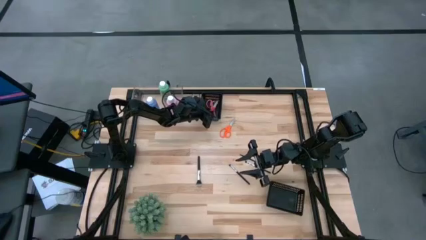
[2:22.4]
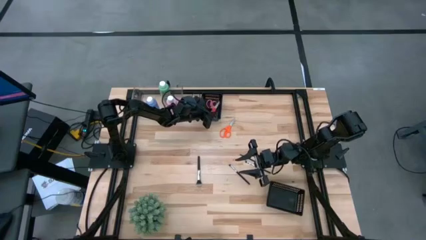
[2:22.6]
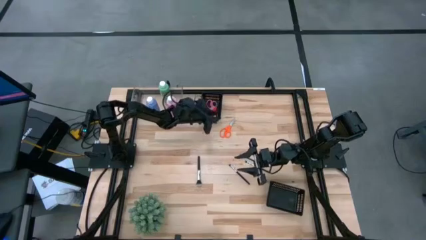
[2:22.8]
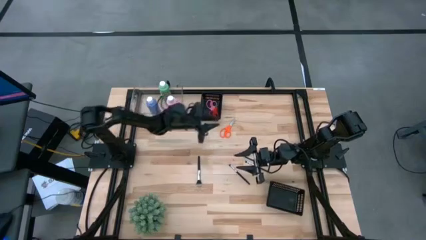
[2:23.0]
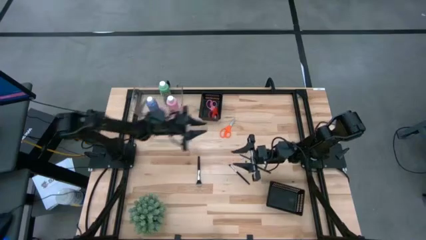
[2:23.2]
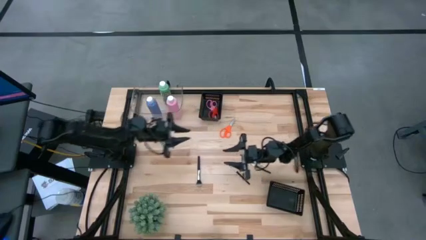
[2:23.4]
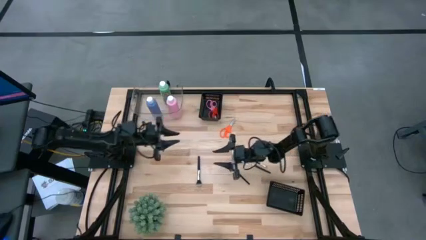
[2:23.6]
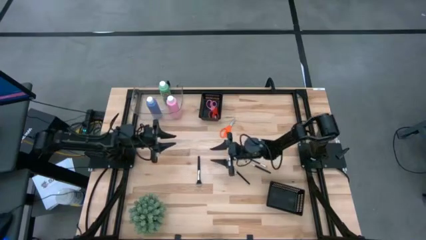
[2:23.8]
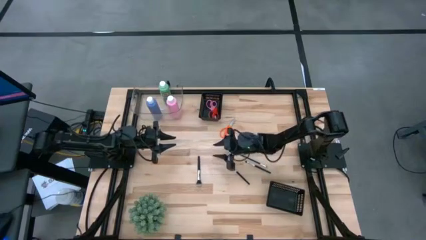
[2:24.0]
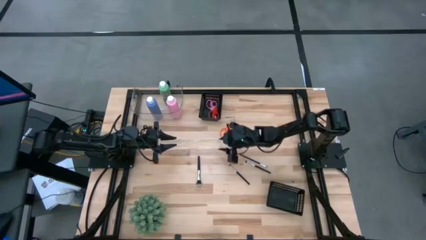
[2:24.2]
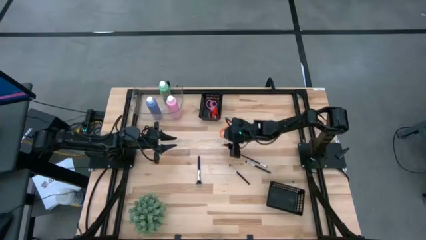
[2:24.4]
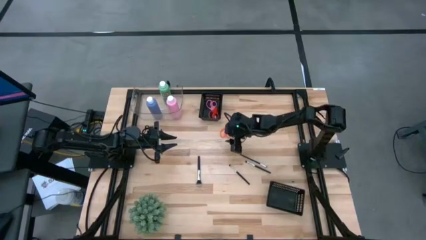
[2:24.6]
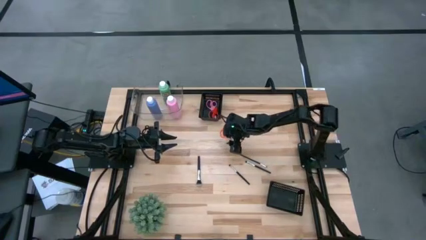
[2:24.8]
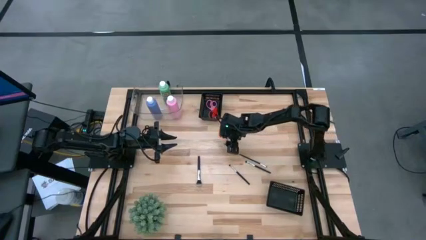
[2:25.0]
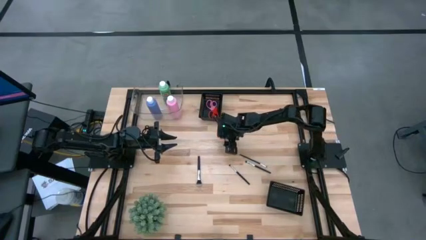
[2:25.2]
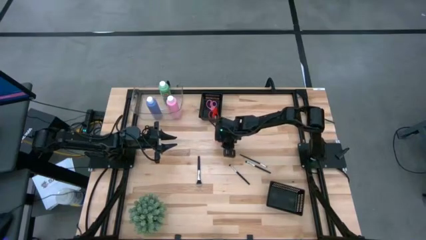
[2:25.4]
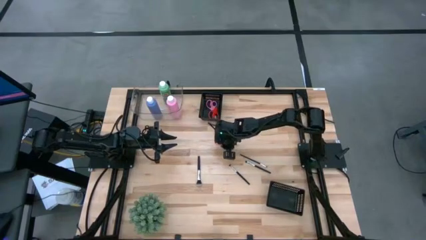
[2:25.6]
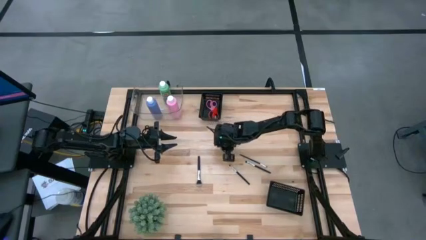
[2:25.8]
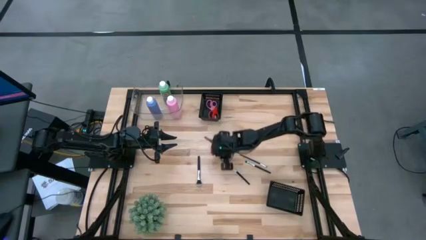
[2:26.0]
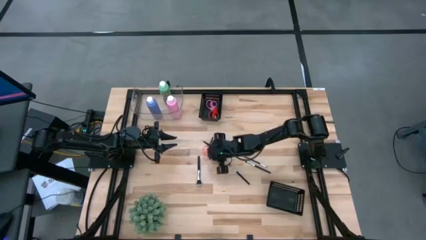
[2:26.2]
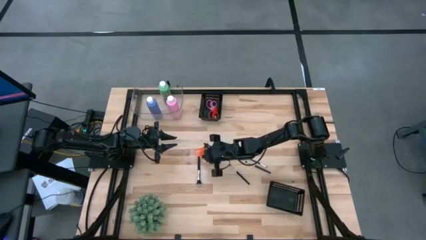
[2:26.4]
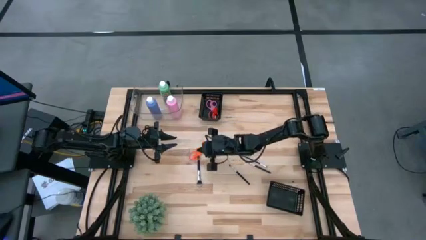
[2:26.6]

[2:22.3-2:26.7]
Task: Pick & Place Paint Supplies
Put the orange scissors into the top black bin

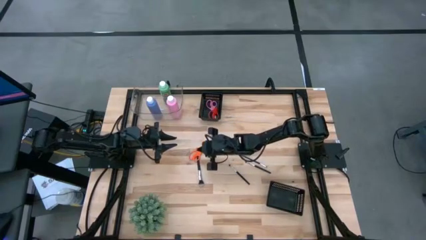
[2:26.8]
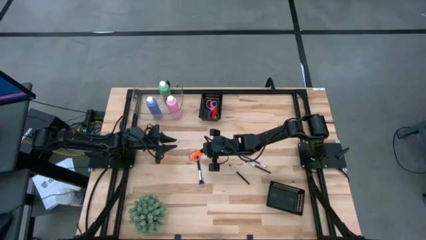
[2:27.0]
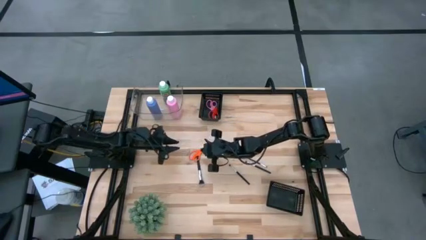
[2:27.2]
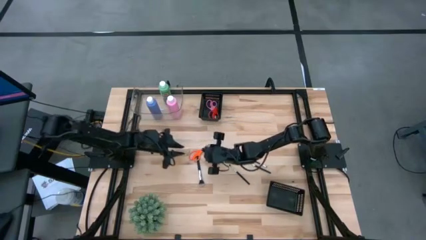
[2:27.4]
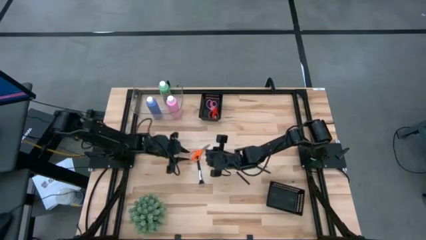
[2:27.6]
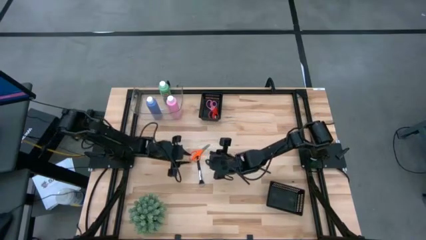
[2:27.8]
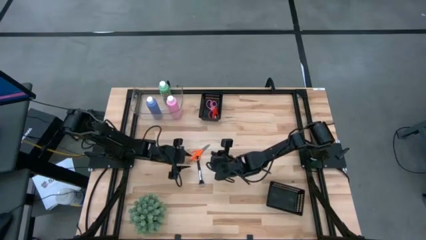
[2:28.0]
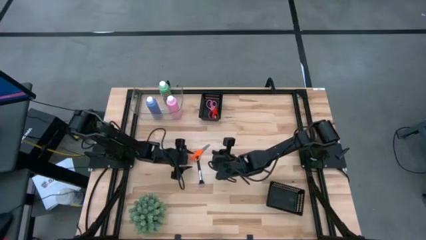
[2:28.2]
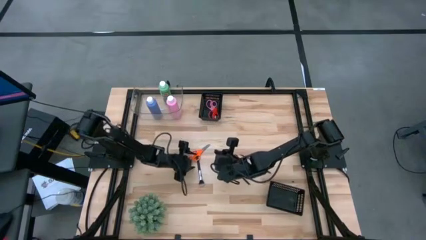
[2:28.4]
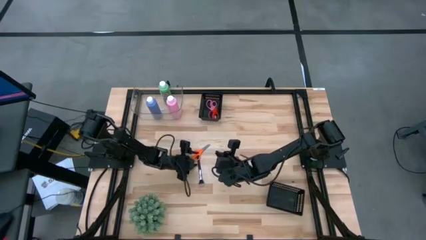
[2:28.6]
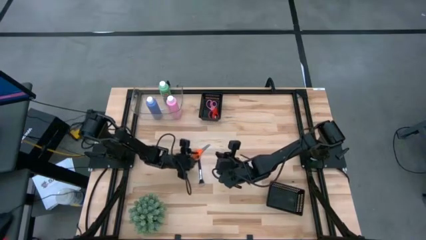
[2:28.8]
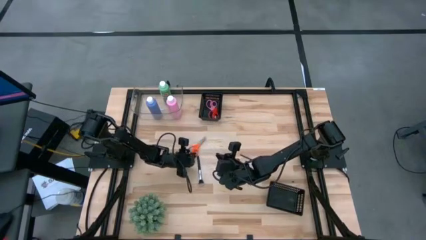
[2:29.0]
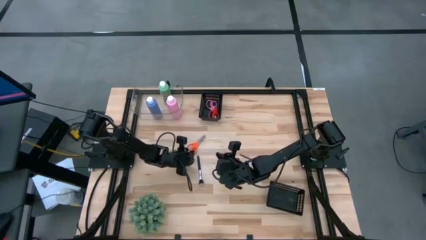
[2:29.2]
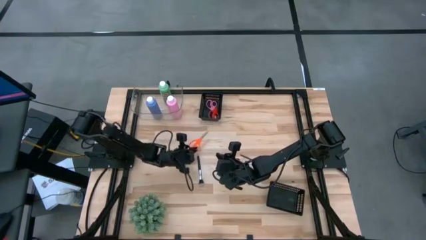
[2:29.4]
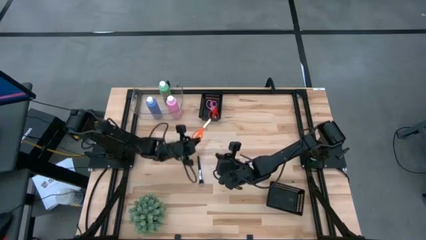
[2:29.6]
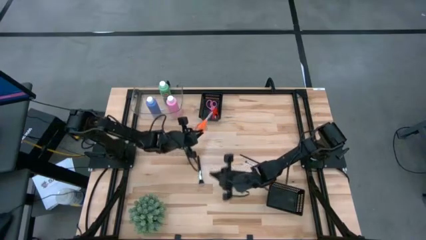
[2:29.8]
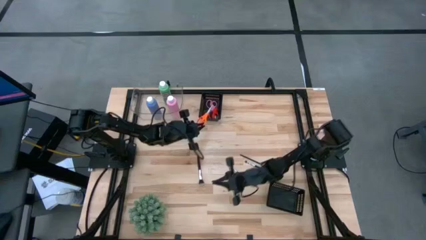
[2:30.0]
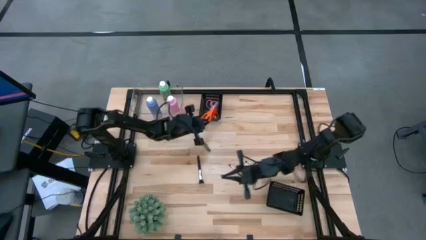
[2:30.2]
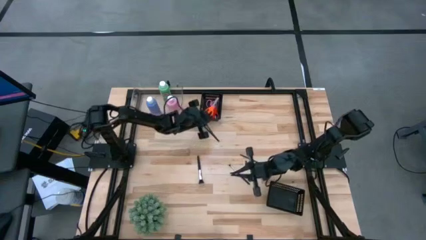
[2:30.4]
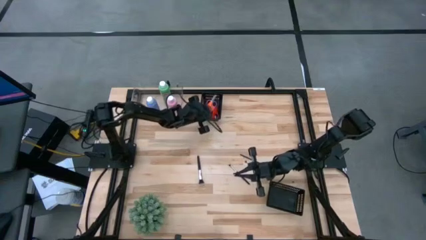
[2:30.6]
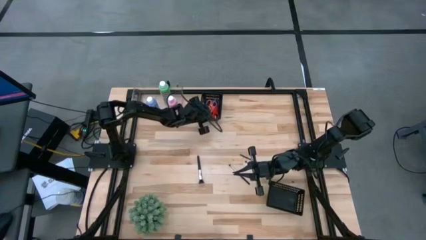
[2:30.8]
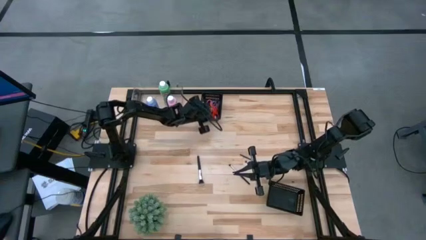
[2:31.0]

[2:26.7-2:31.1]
Put the orange scissors into the top black bin

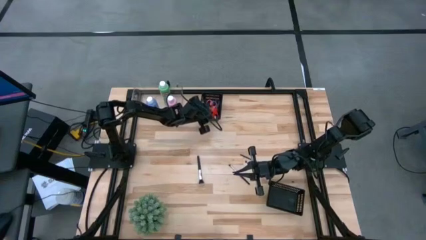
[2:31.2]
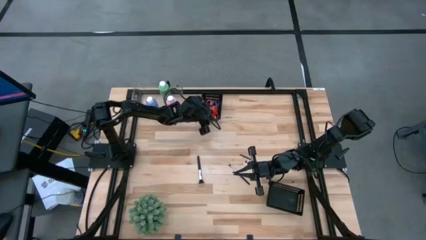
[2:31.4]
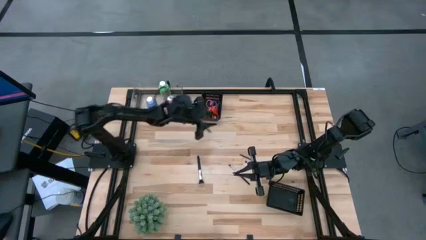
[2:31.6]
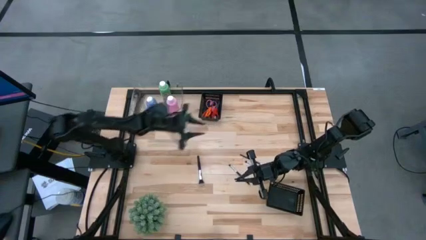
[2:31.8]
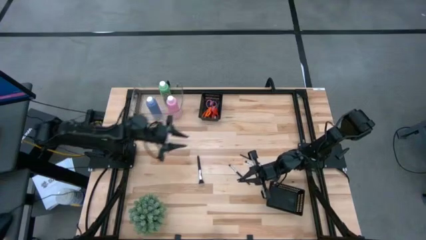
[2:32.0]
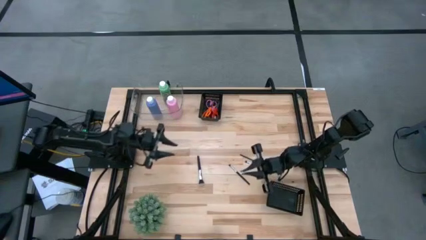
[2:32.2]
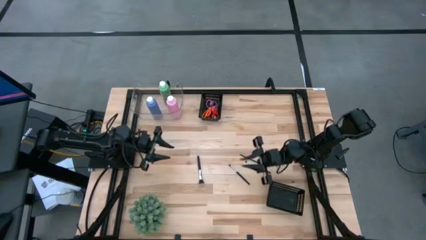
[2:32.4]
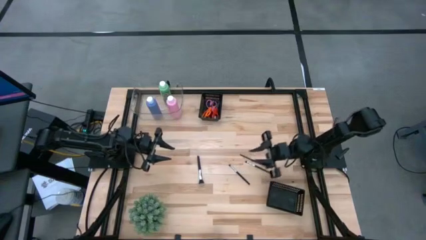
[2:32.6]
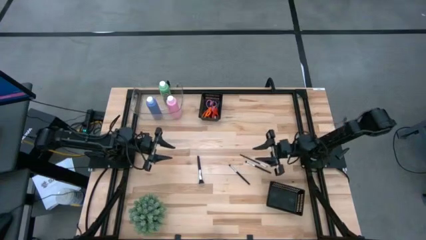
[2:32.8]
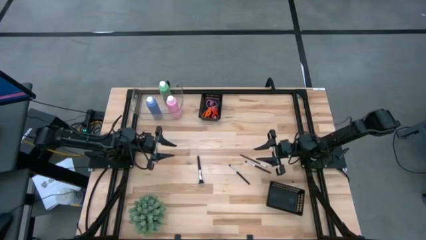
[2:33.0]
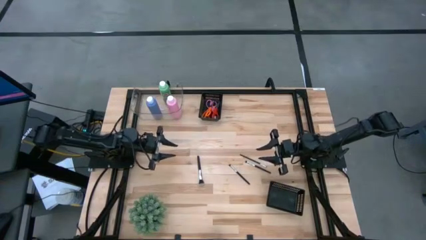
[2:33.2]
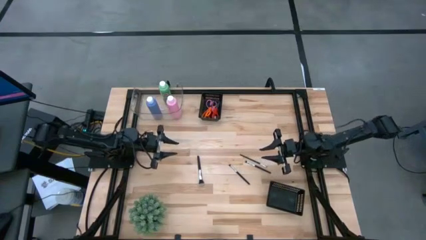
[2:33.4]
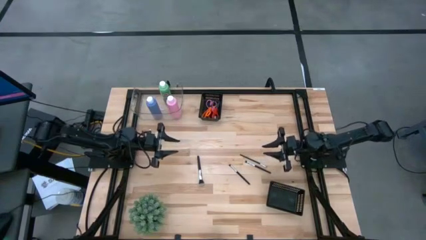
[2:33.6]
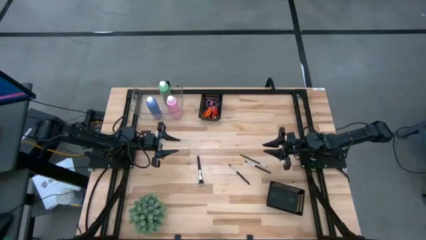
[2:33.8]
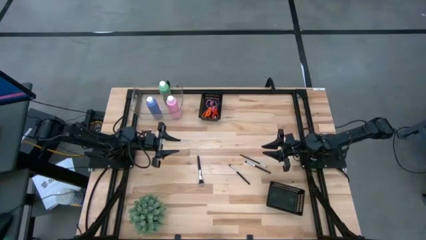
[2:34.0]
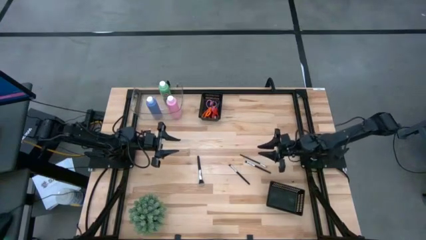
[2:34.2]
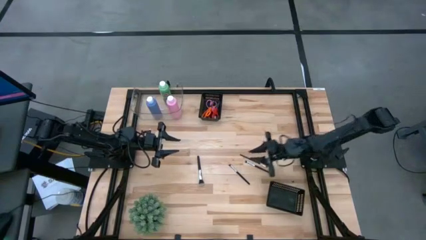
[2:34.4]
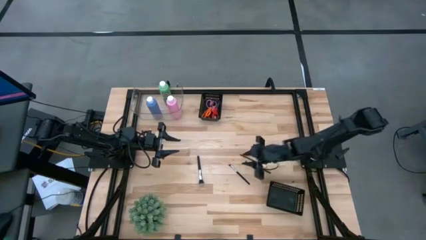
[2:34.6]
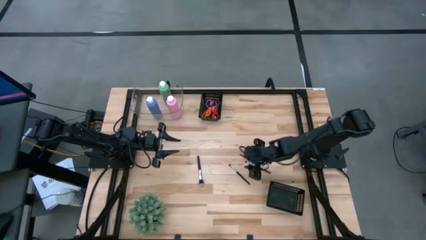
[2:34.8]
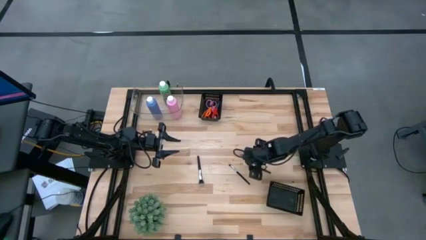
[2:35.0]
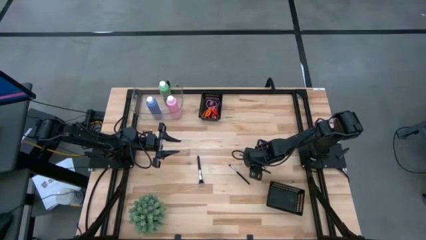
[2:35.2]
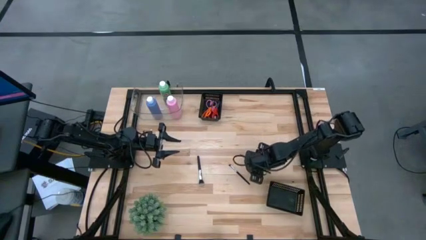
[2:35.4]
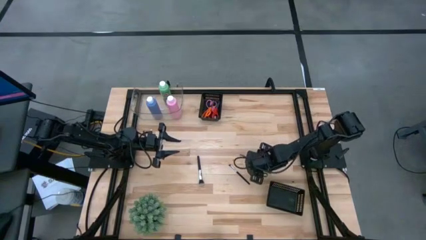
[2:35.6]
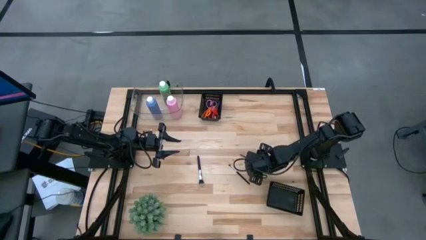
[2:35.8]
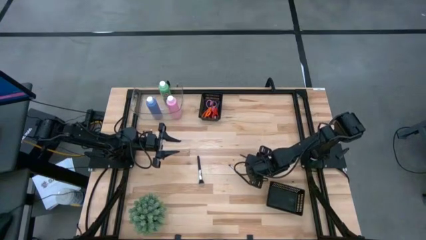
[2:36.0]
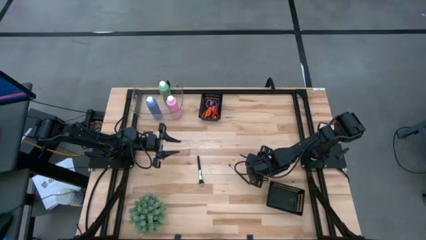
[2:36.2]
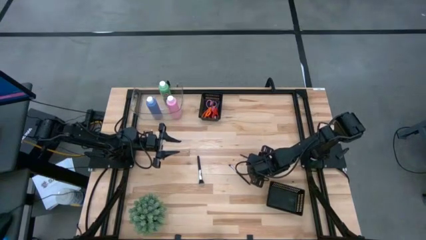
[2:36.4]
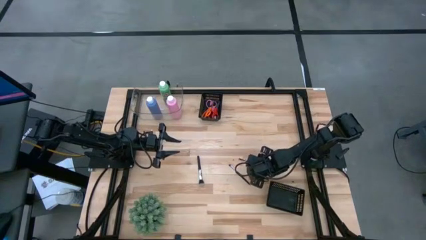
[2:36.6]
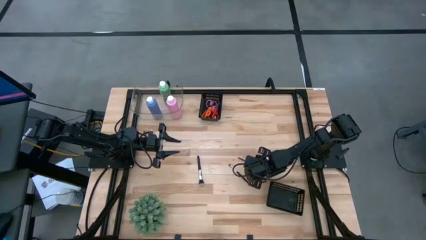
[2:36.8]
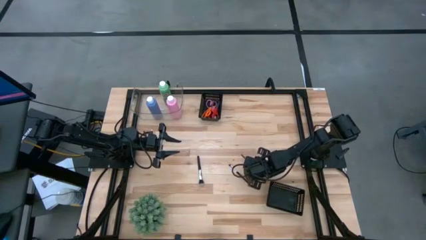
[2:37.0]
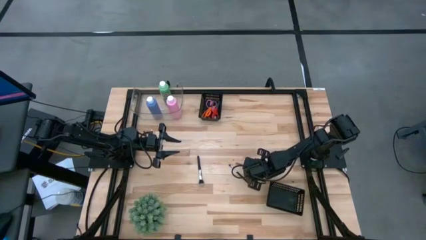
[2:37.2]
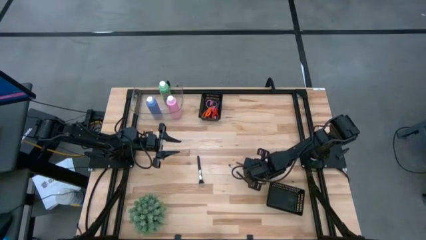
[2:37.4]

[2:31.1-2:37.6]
Put the black paint brush into the bottom black bin

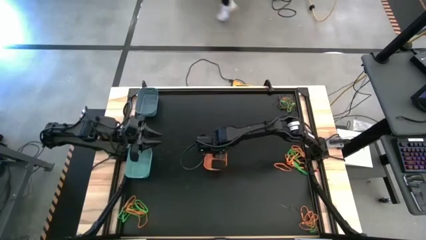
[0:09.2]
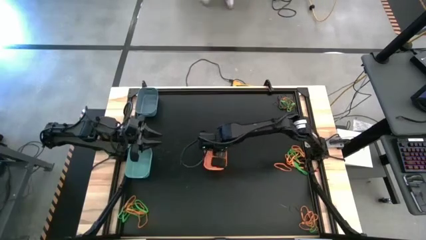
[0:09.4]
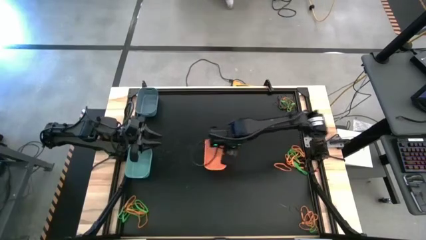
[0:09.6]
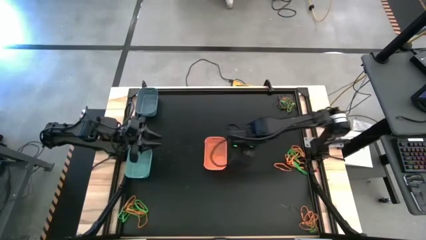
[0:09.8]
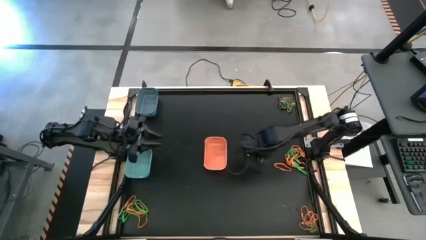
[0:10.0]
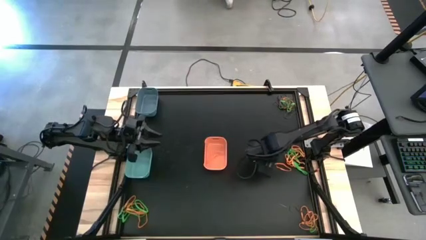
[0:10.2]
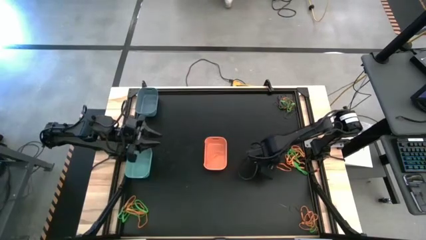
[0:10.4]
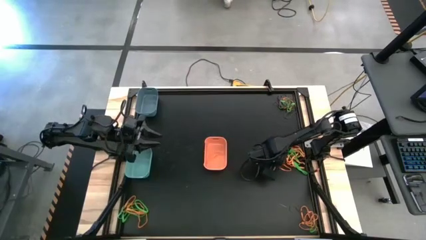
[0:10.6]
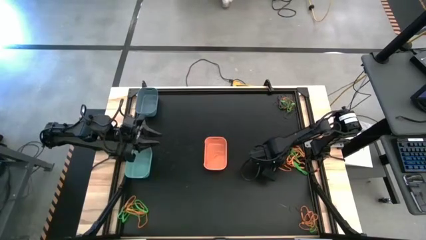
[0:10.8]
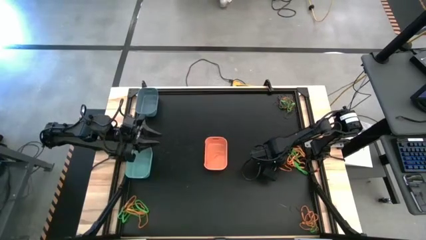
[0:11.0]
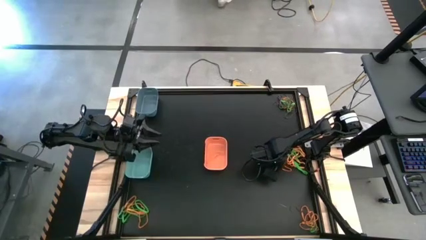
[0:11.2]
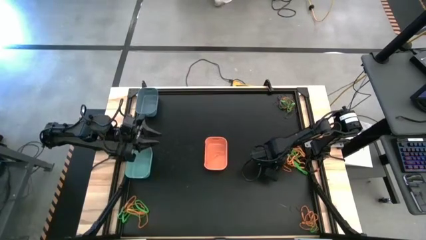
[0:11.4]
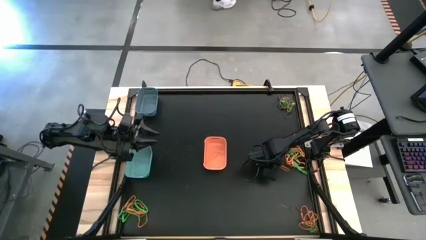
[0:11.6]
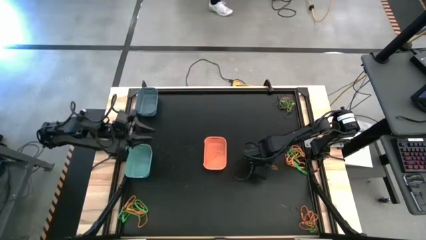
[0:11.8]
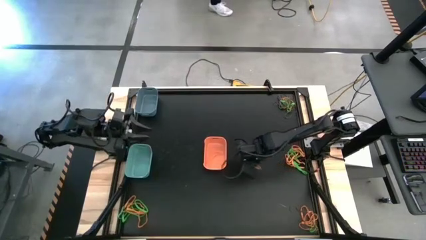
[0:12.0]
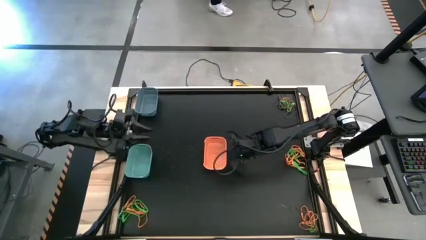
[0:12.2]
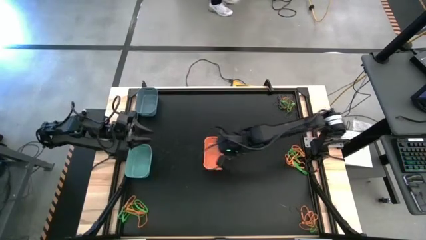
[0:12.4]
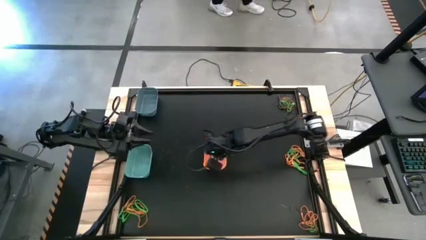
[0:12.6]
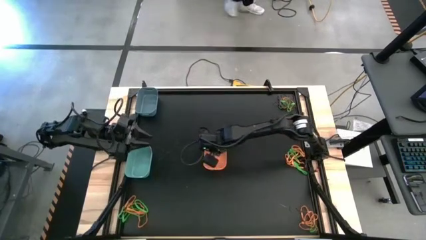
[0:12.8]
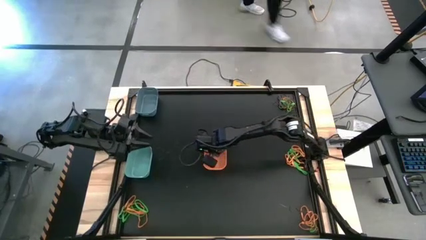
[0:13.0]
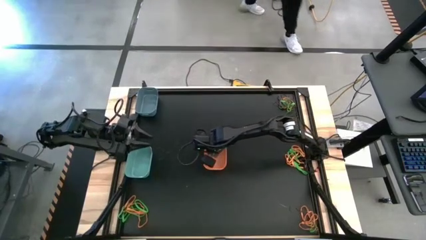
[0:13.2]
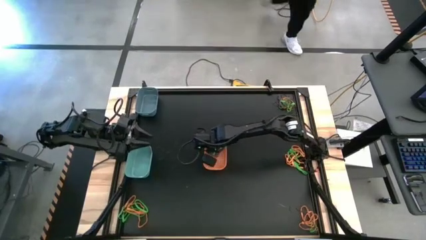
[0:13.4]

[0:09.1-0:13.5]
Task: Sort rubber bands into baskets
Put the orange rubber band into the orange bin
